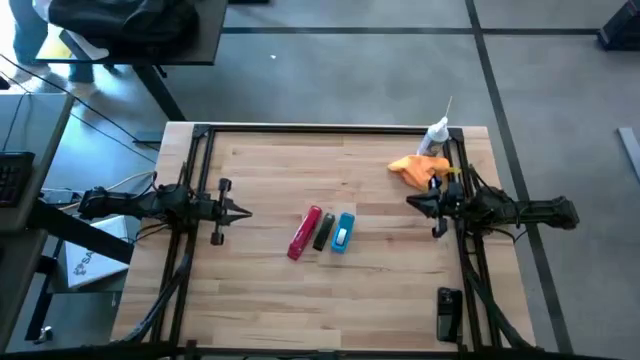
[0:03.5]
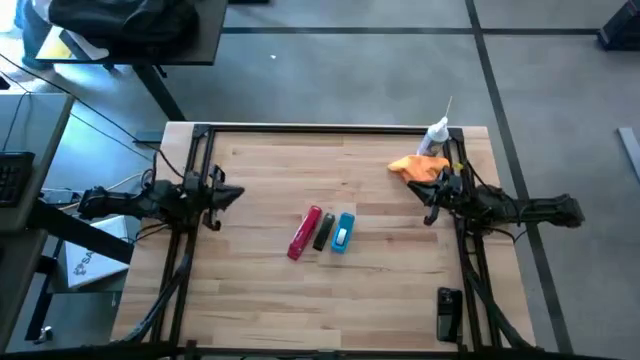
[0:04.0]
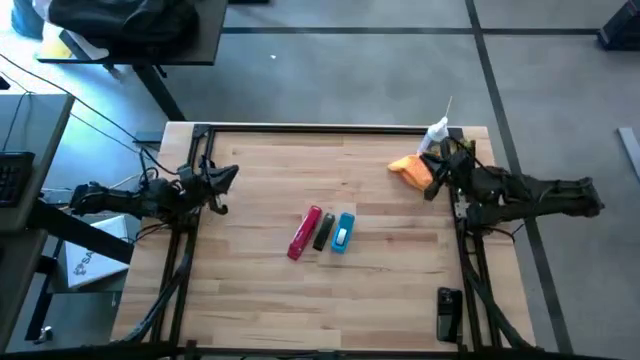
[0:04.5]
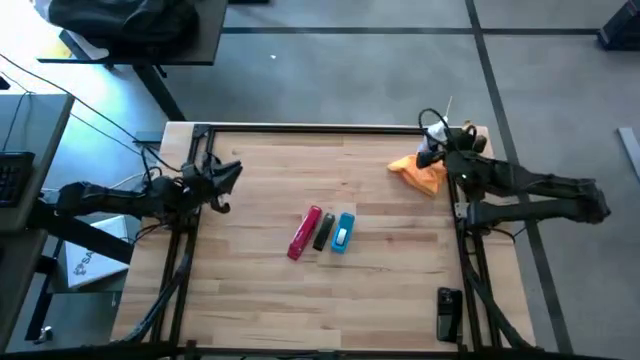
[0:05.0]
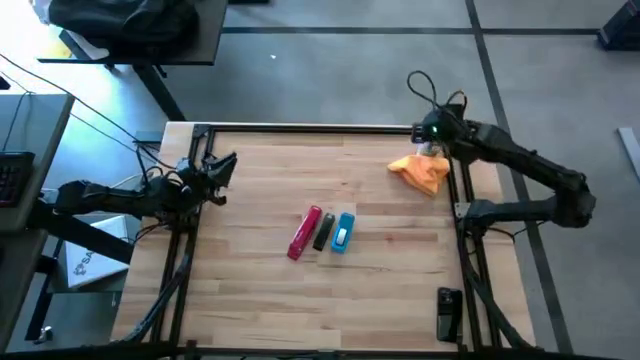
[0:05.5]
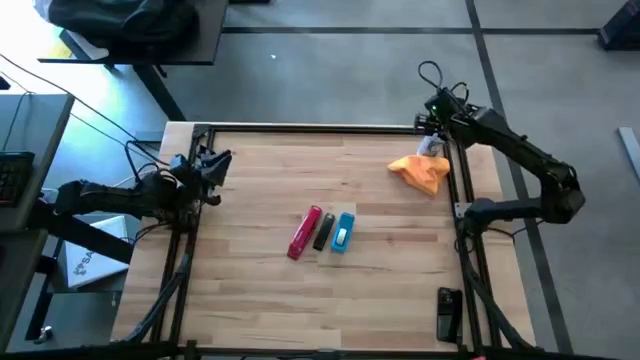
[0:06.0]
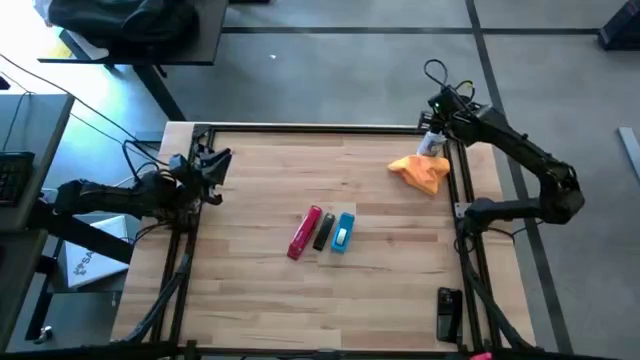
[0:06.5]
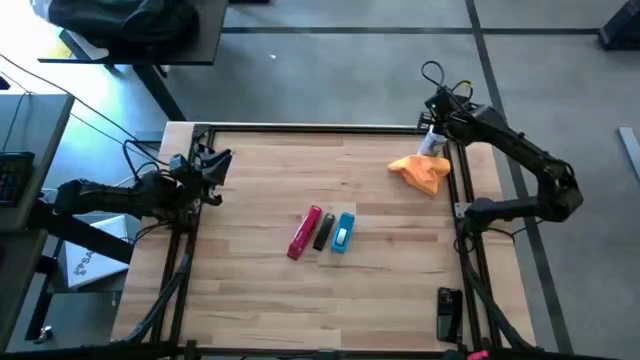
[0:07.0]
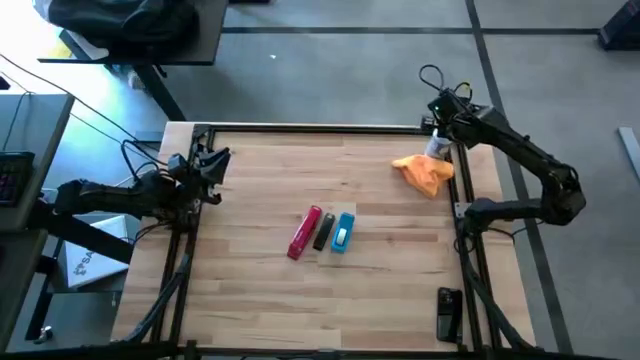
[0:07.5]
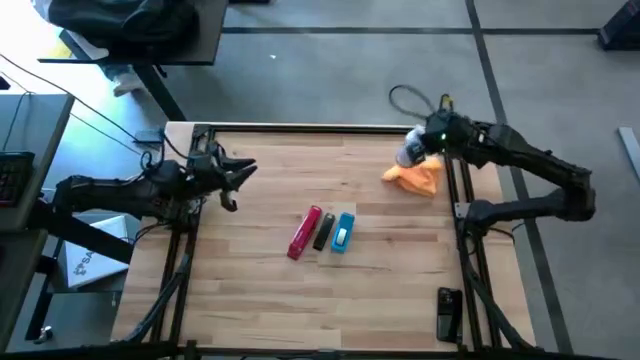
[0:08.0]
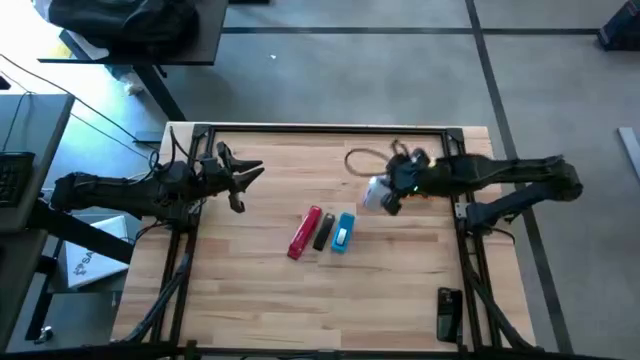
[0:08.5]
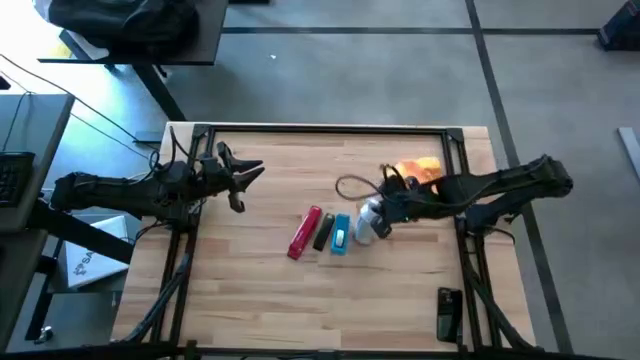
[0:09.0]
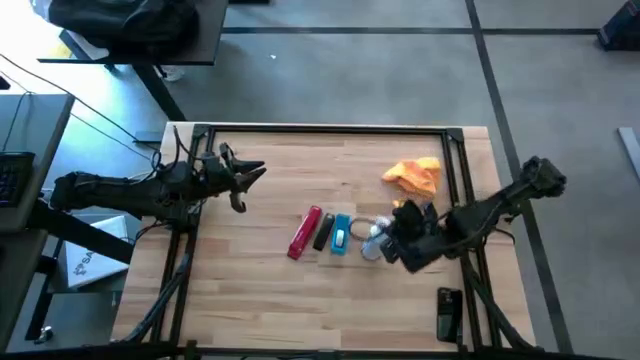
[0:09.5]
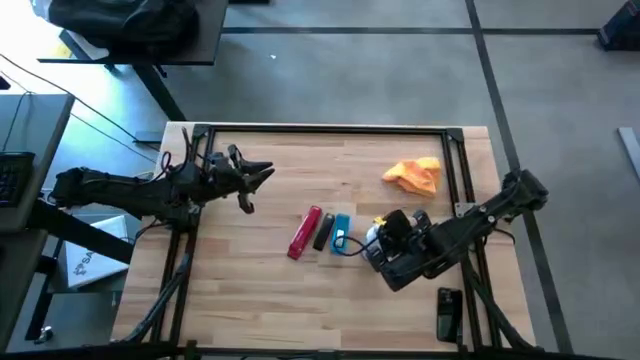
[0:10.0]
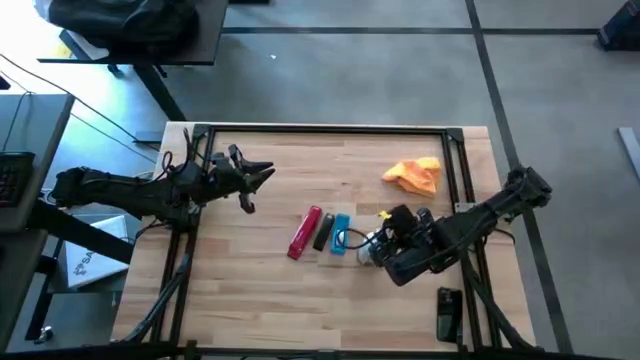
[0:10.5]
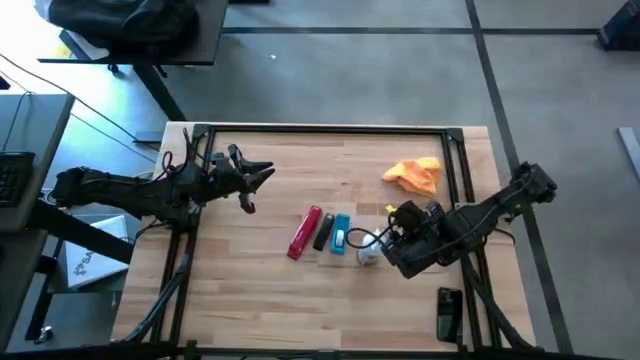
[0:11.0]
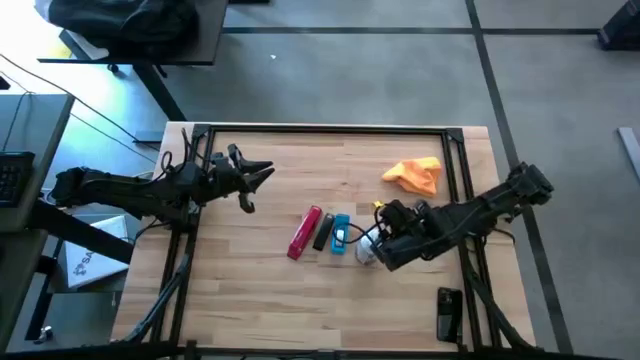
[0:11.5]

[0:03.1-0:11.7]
Task: Apply microfiber cloth
Prepare the white spray bottle

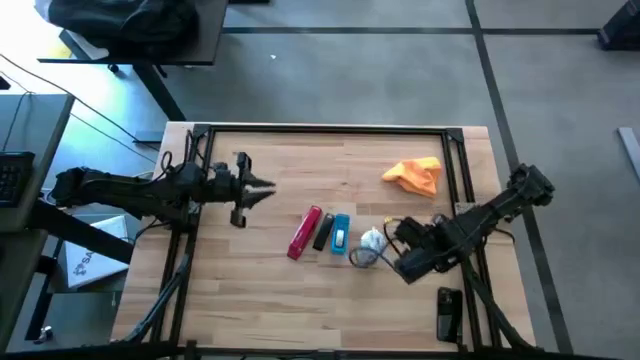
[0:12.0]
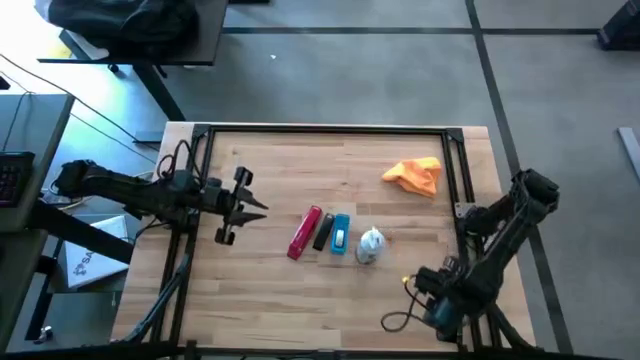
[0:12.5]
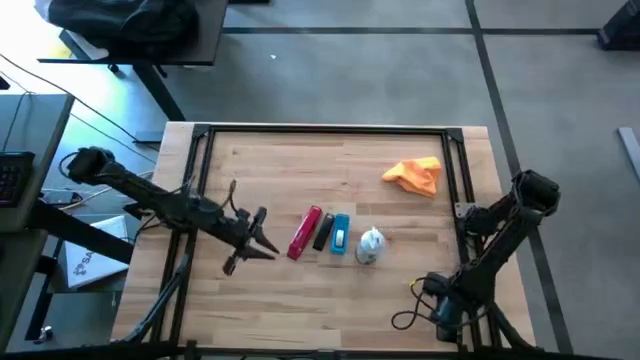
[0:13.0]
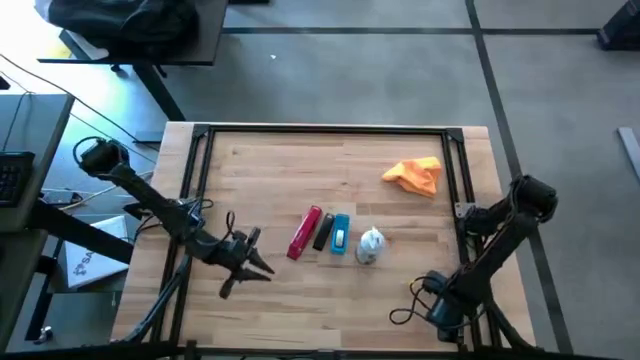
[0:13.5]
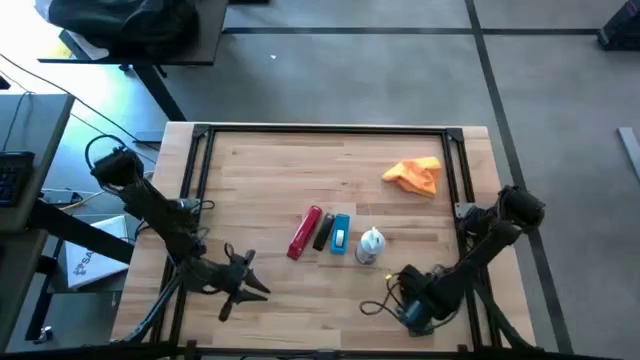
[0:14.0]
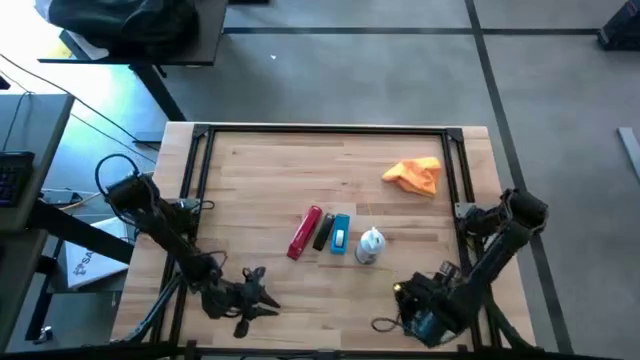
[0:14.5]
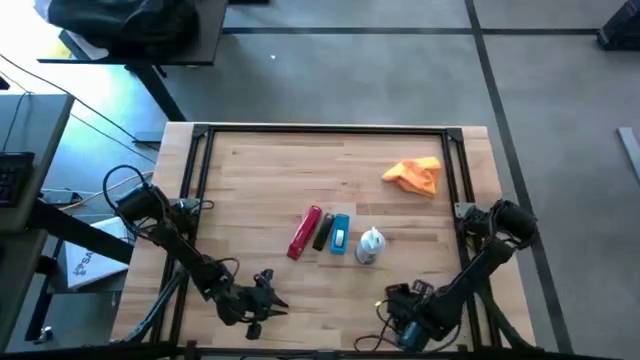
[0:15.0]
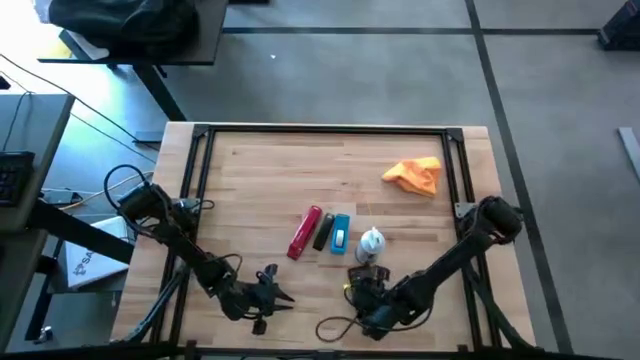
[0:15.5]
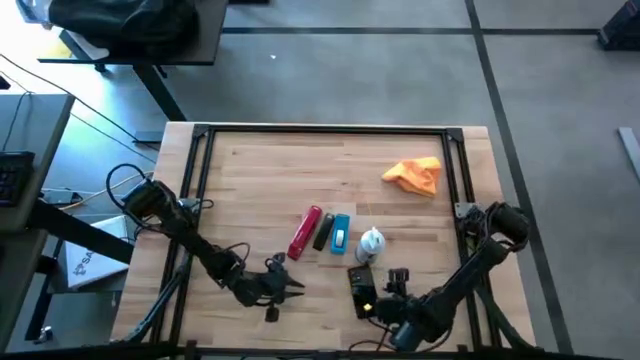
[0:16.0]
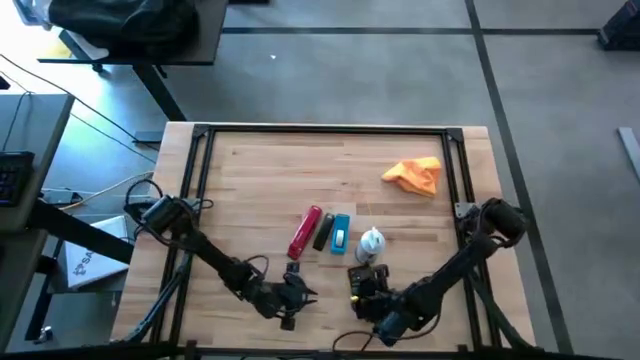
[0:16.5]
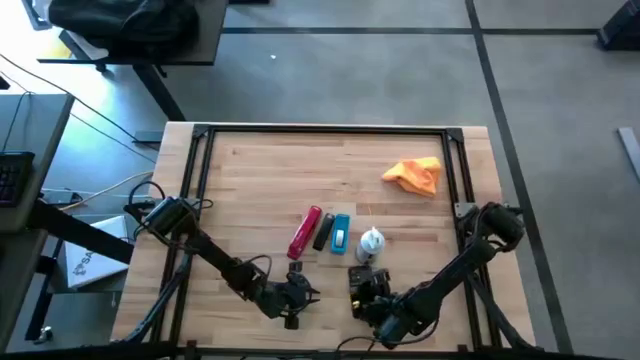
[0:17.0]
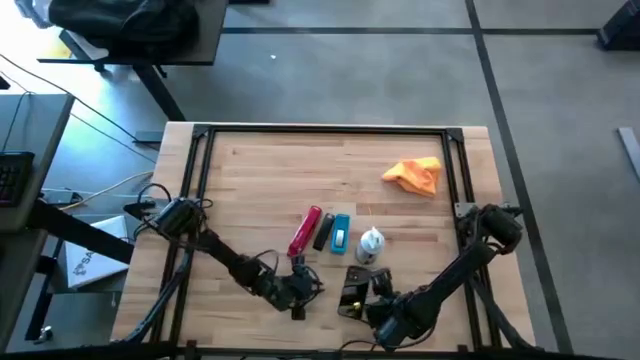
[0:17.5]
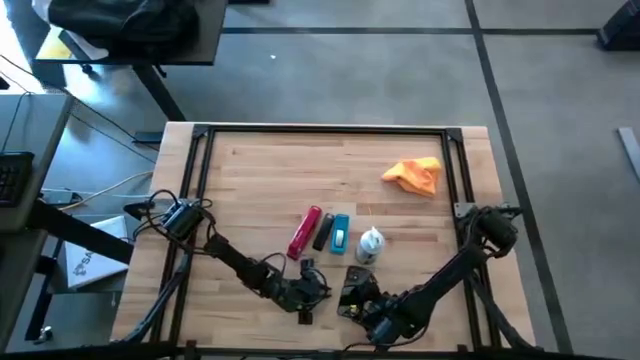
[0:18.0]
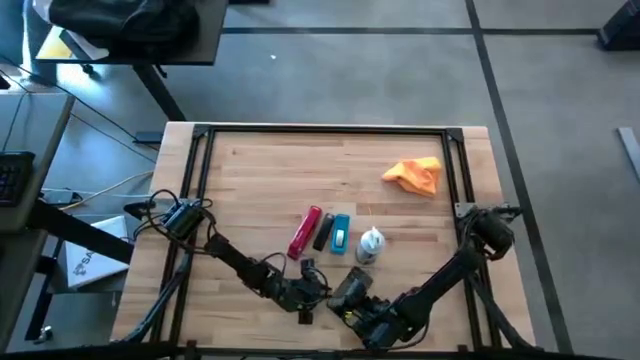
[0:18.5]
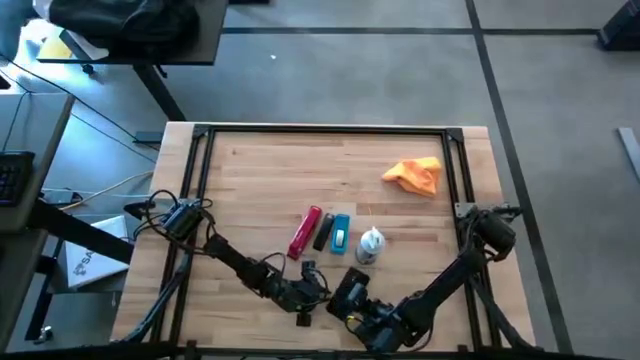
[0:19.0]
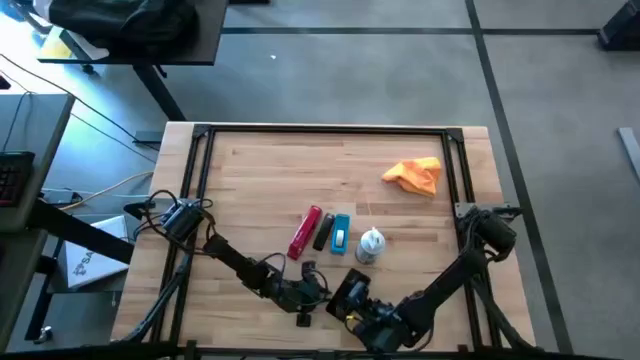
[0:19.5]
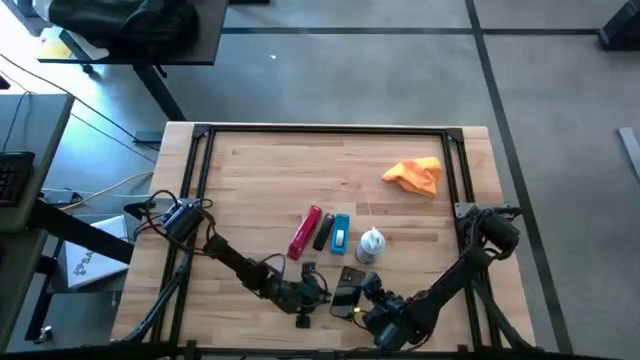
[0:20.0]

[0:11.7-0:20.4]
Spray the black cellphone using the white spray bottle

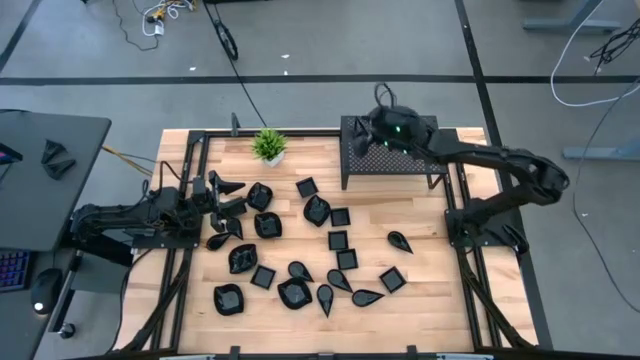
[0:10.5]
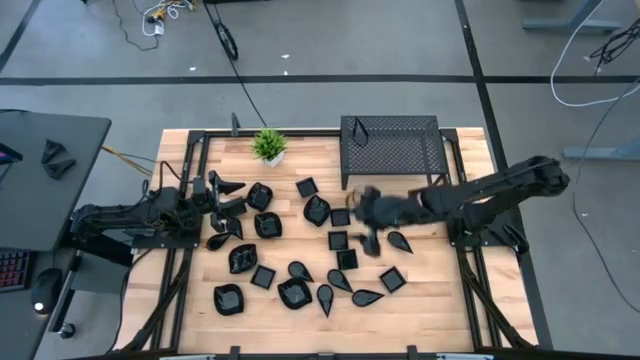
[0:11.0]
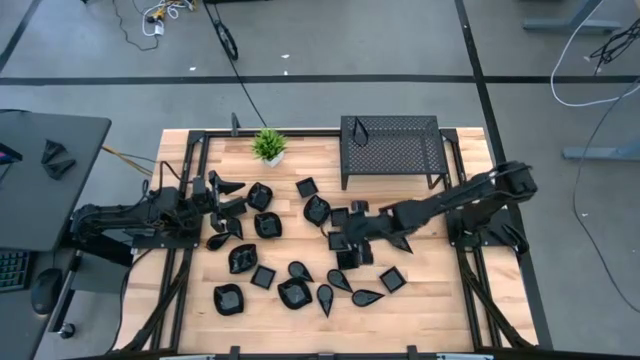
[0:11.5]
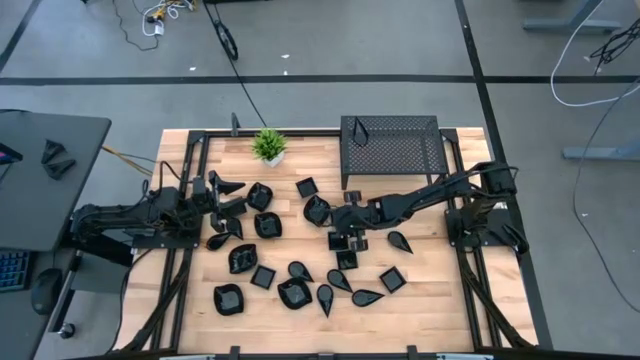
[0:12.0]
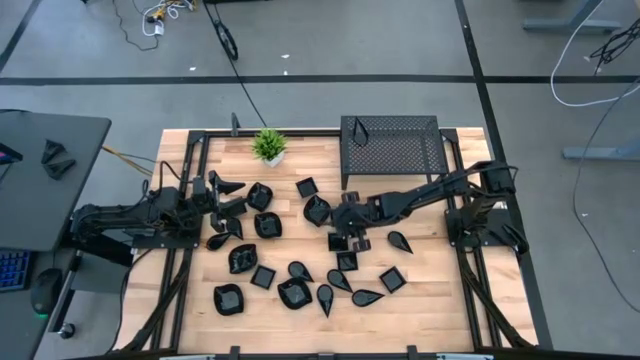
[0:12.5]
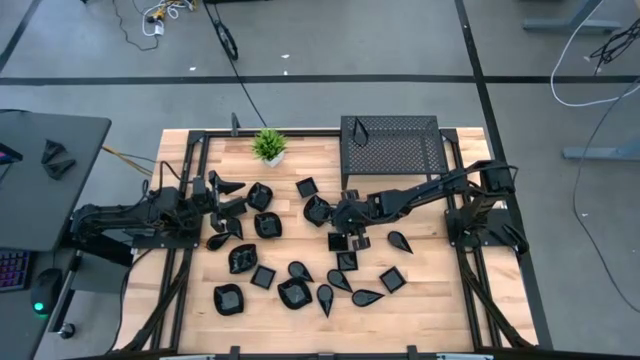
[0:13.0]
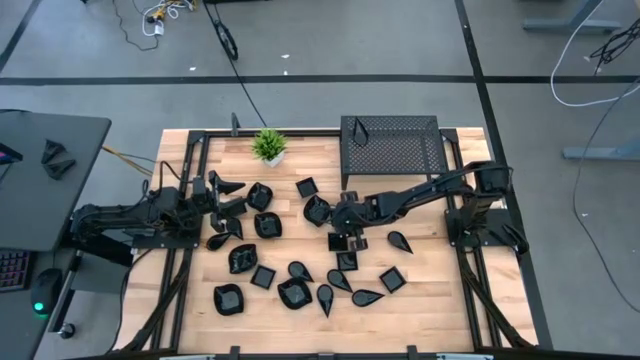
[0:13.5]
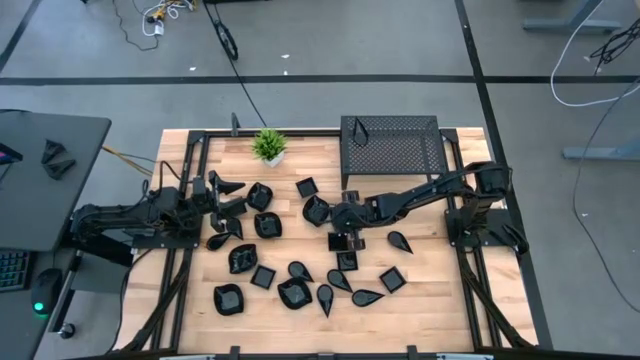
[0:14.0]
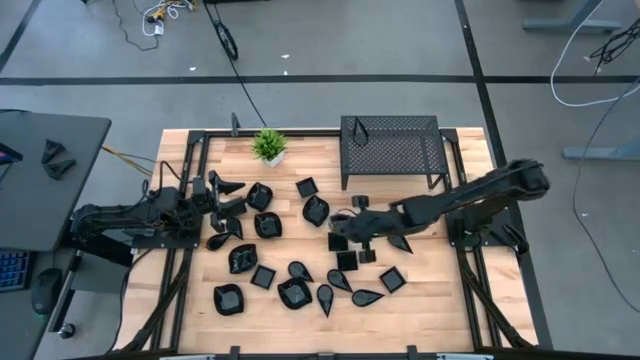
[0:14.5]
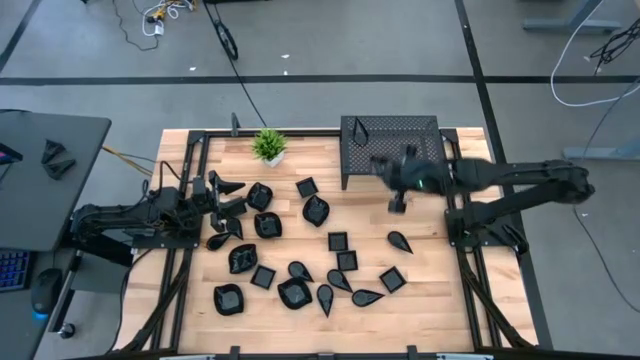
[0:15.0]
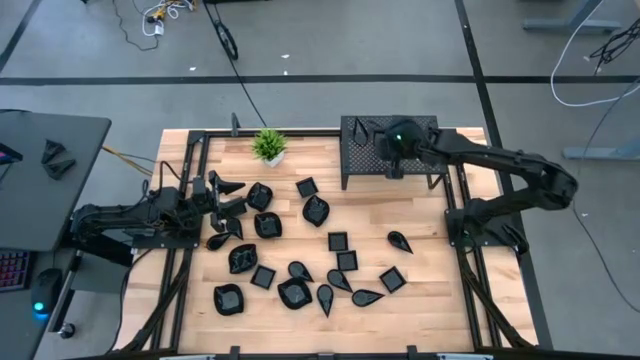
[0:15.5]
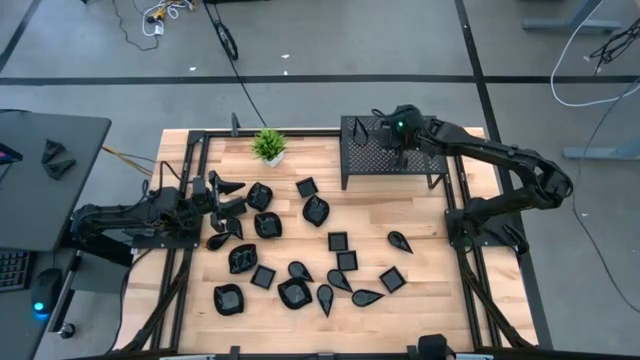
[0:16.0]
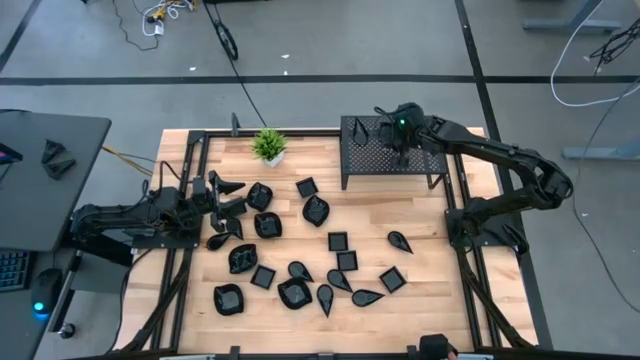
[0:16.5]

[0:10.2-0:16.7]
Task: Pick & Place Mini shaped plates
Put the black square plate on the shelf
